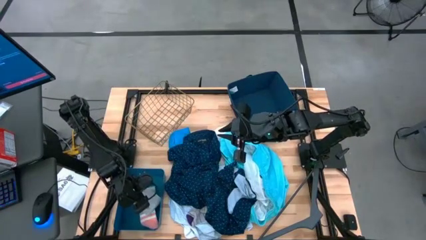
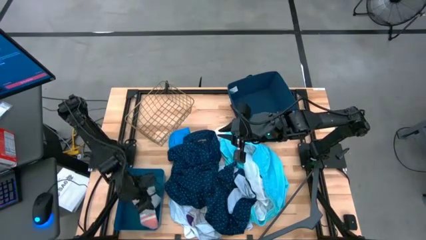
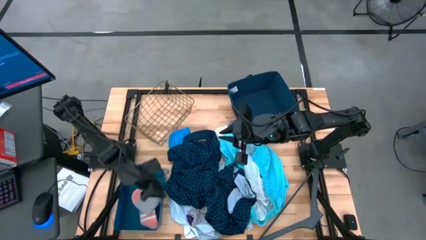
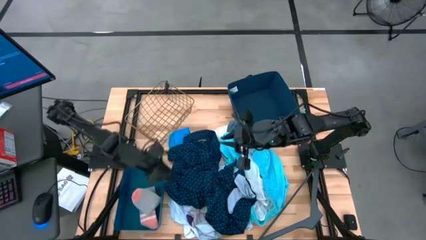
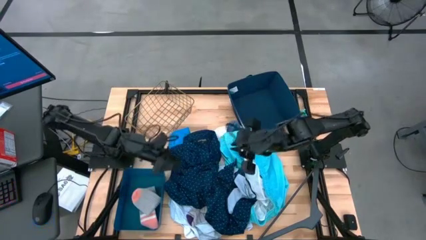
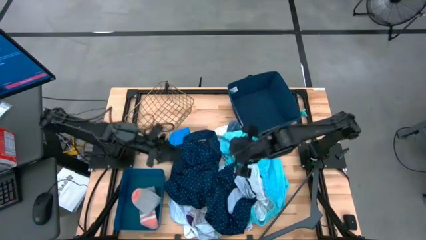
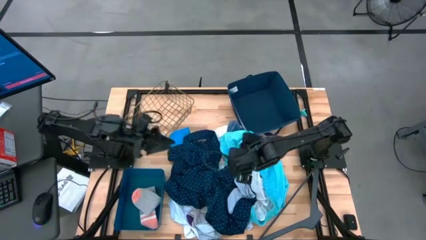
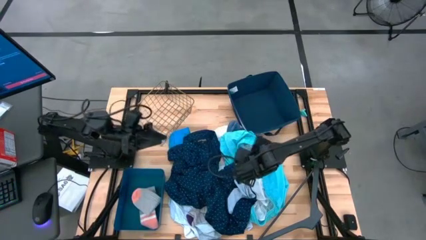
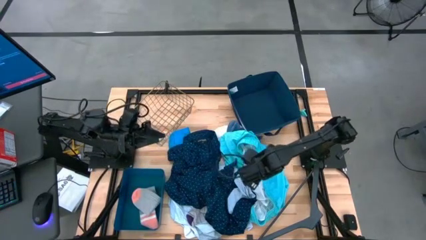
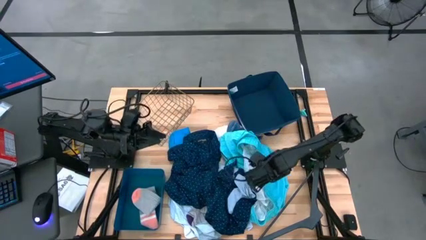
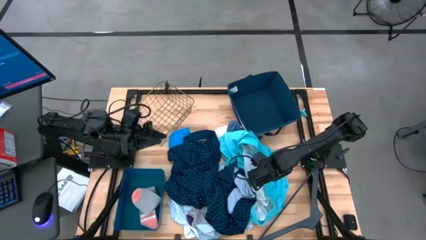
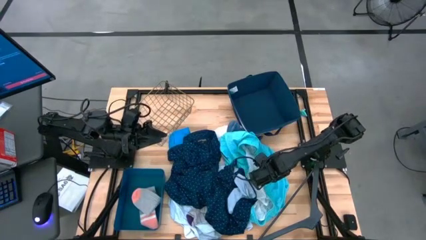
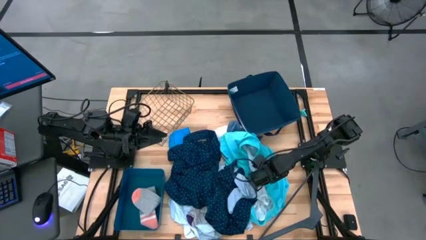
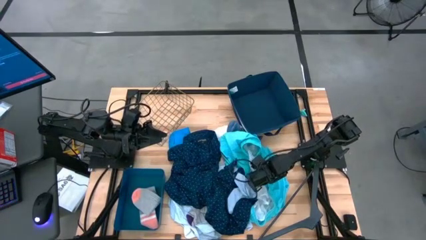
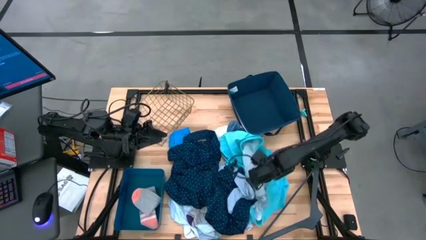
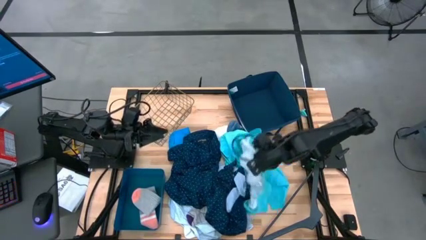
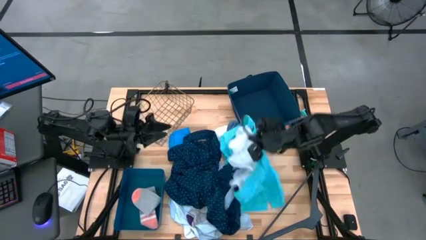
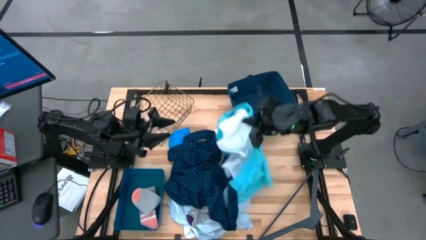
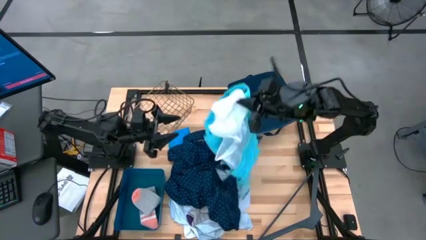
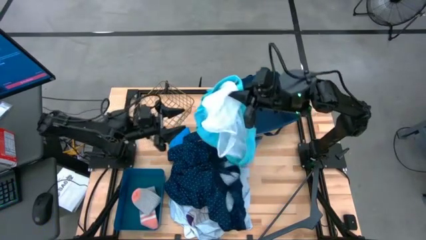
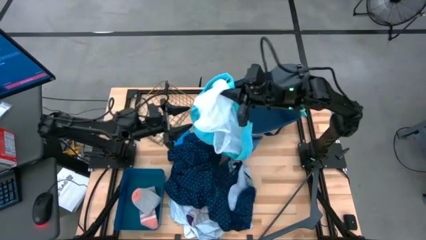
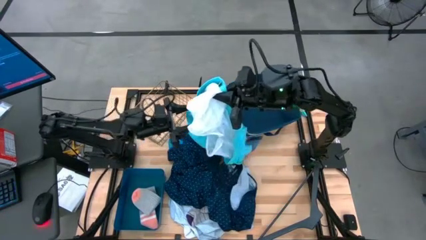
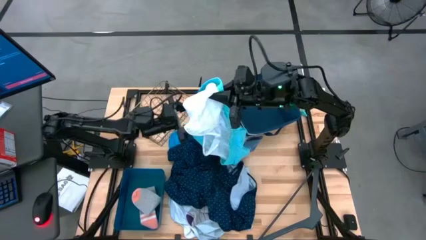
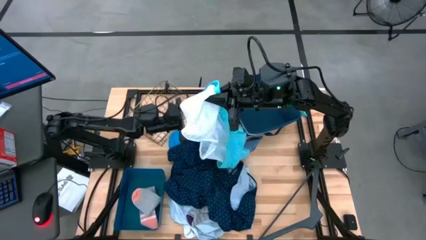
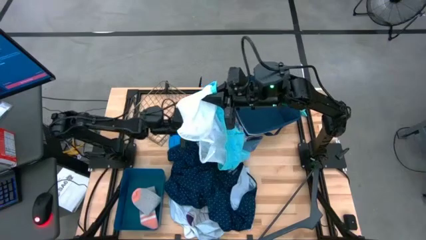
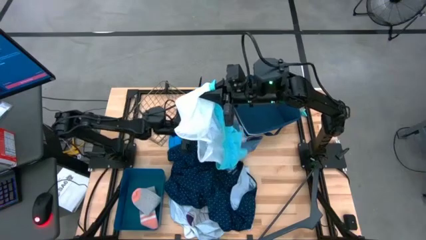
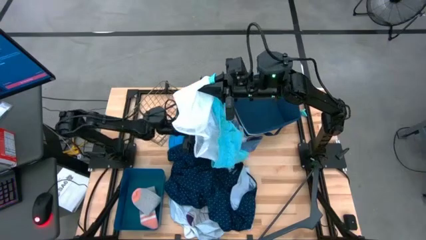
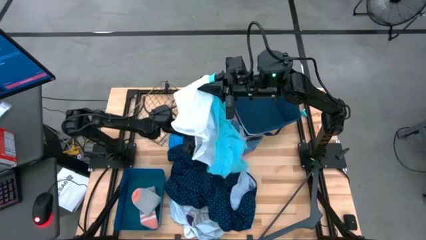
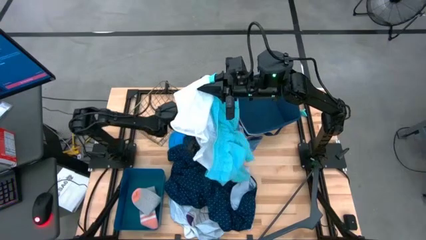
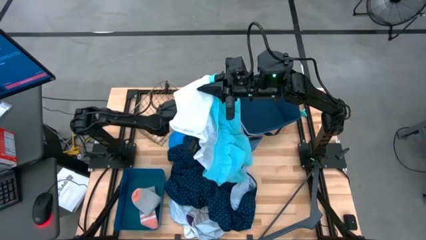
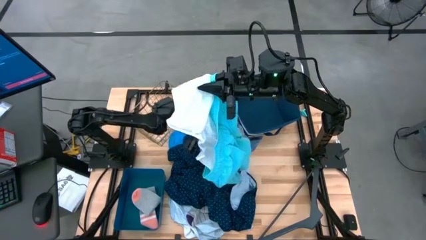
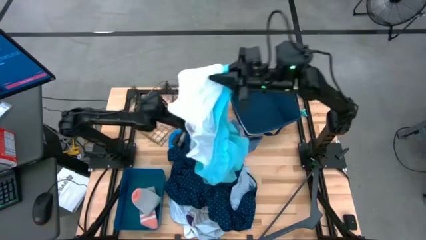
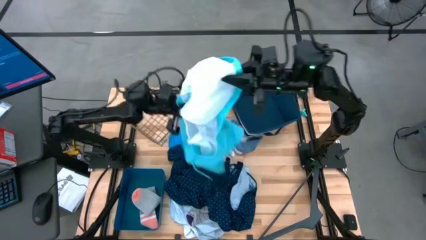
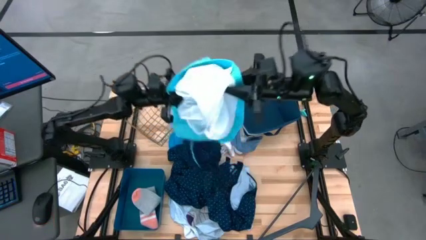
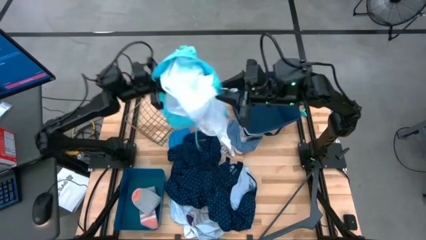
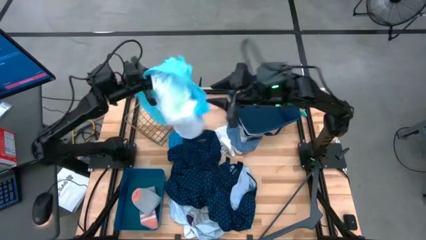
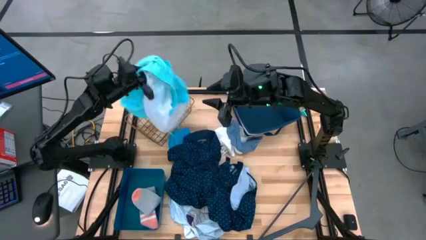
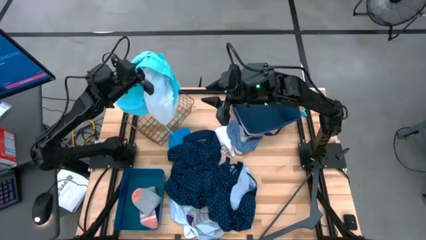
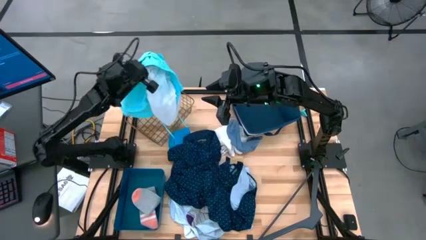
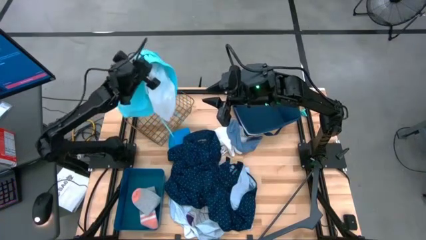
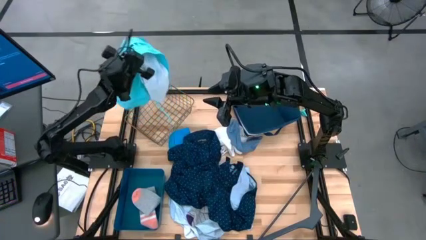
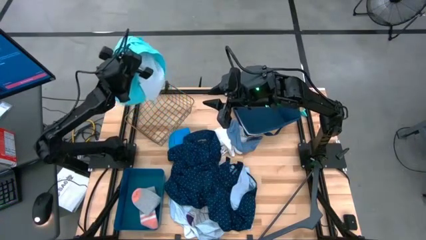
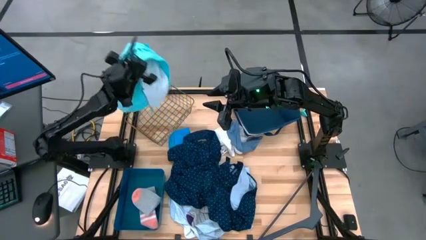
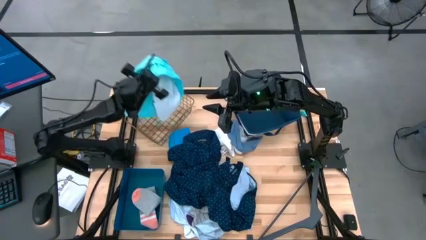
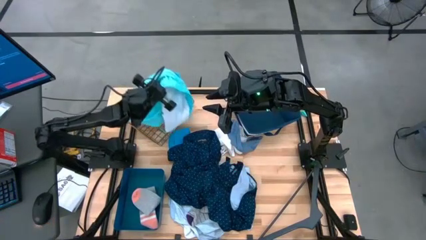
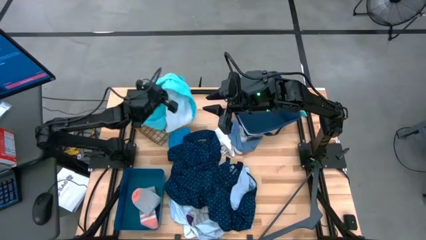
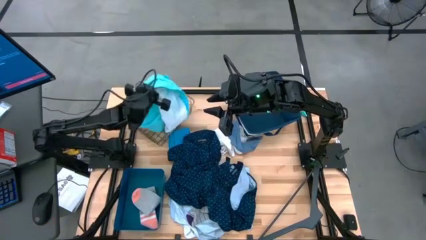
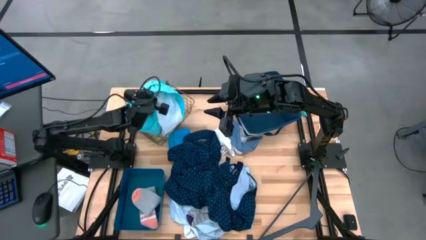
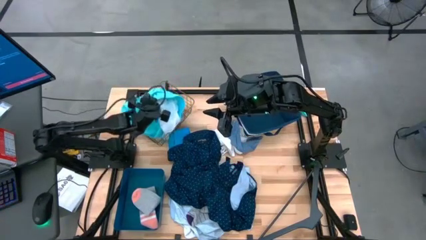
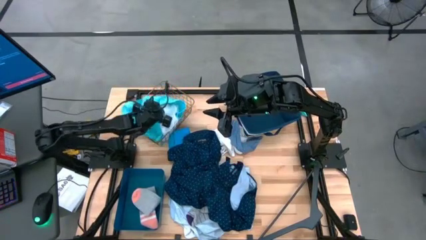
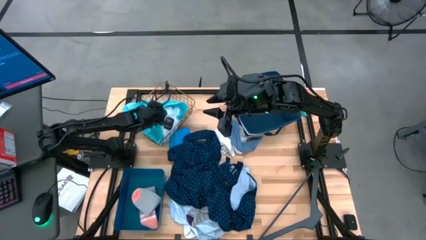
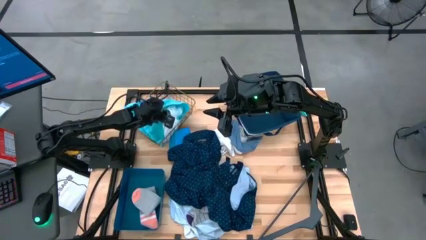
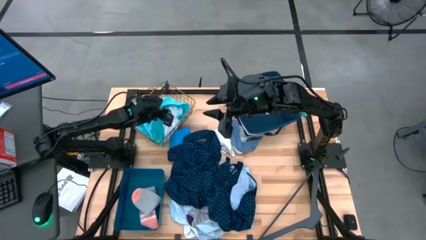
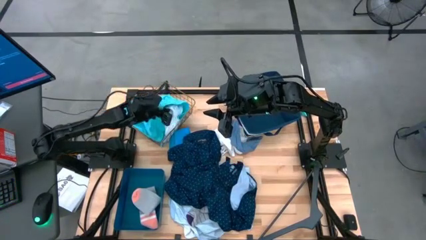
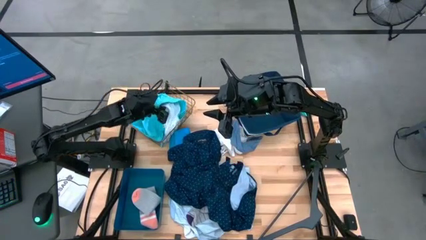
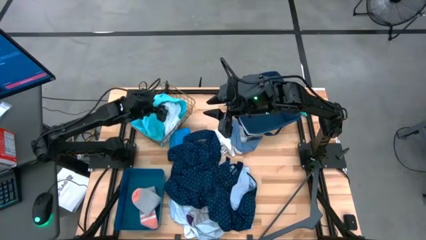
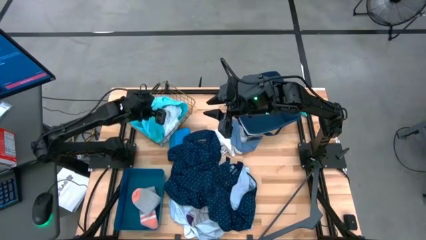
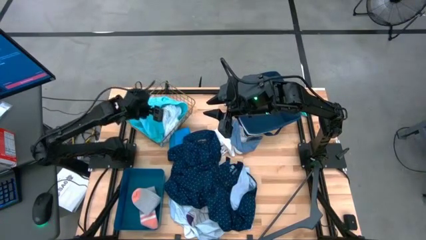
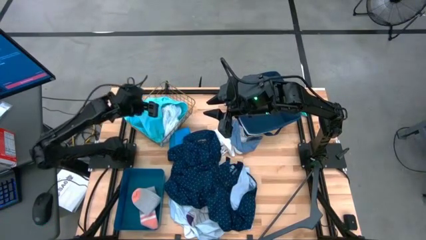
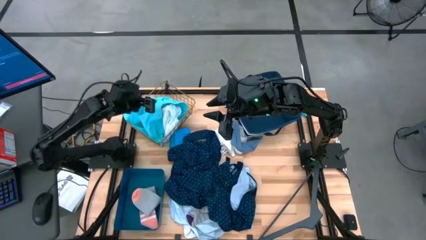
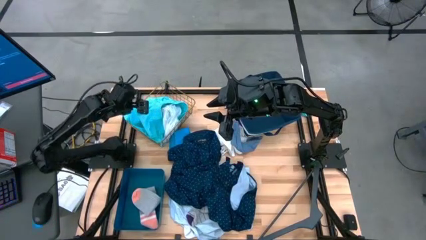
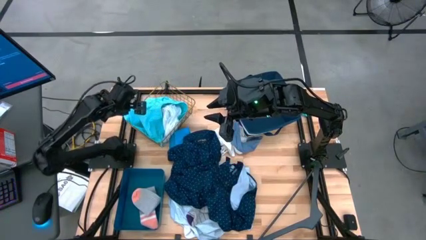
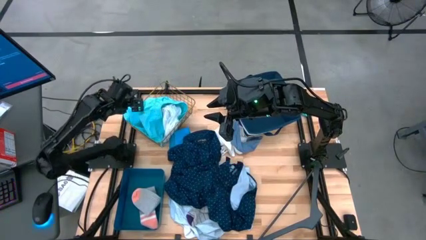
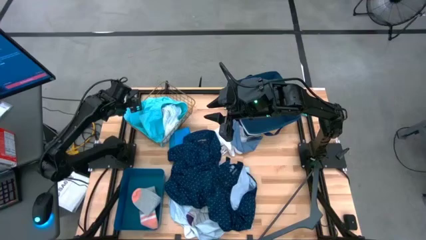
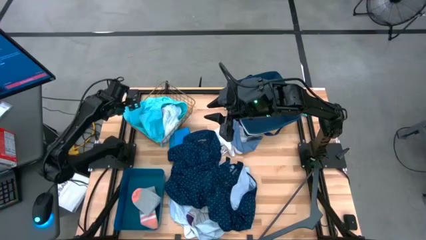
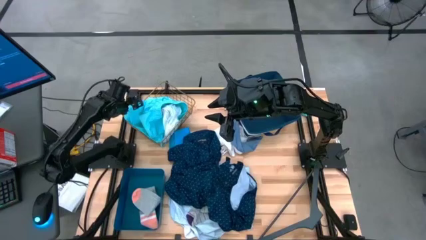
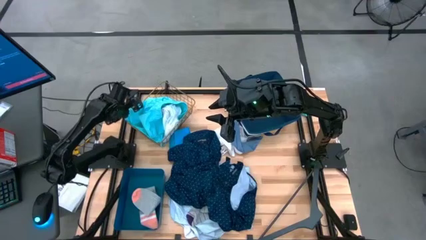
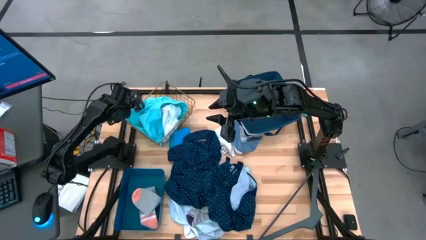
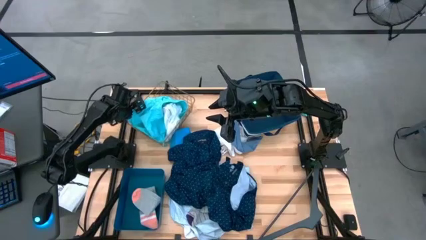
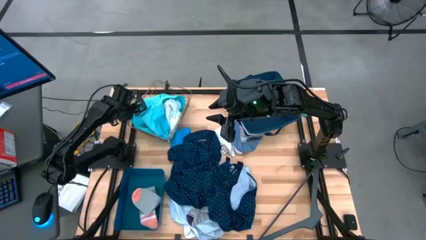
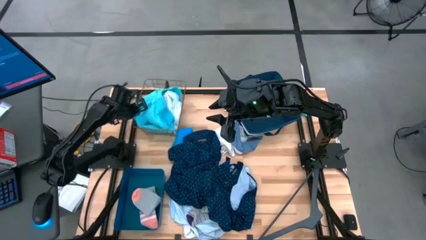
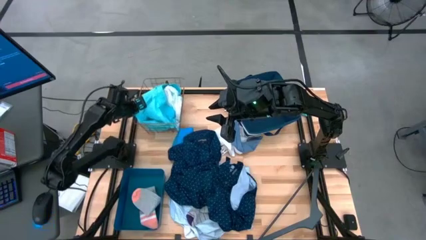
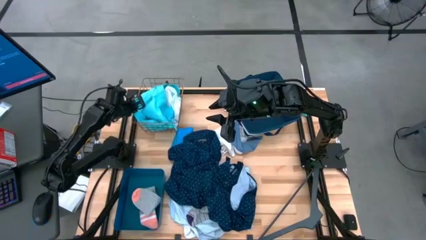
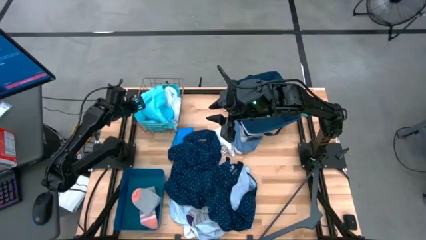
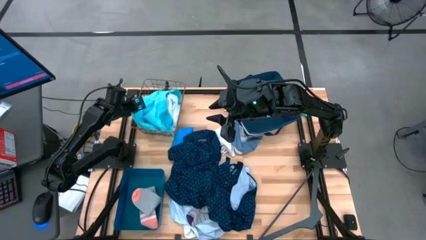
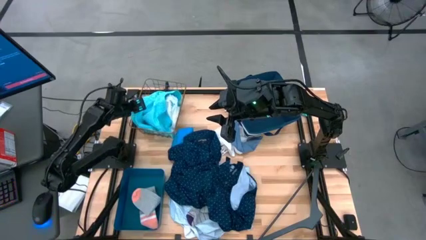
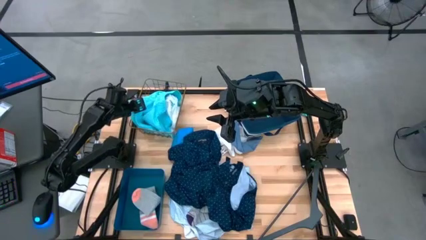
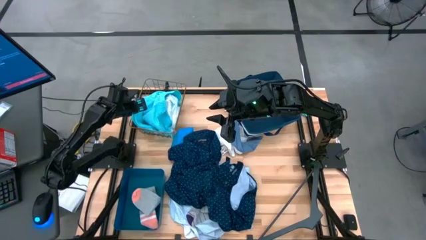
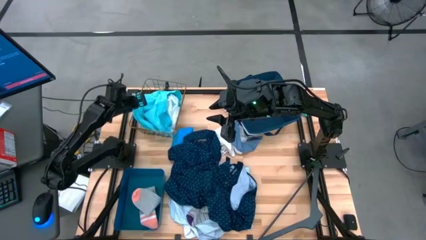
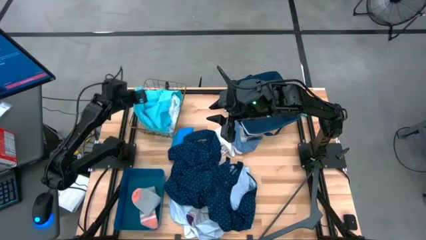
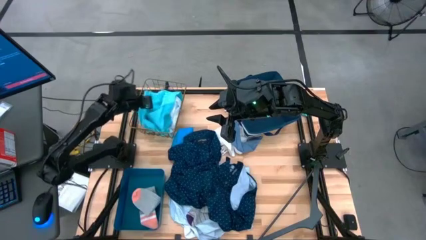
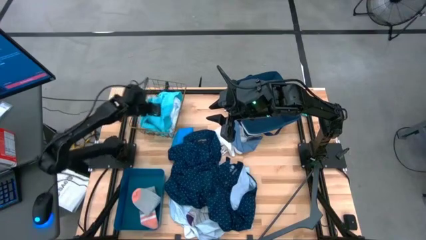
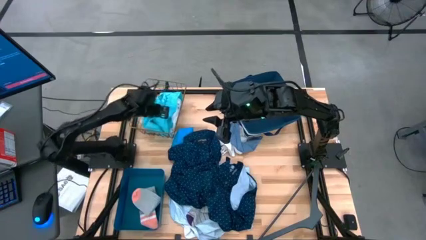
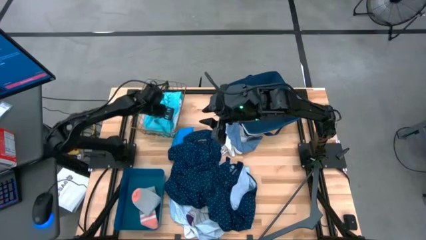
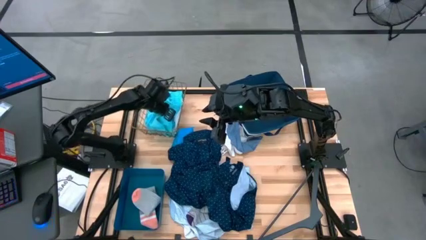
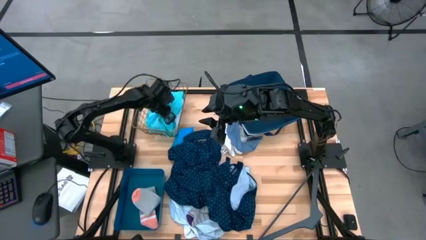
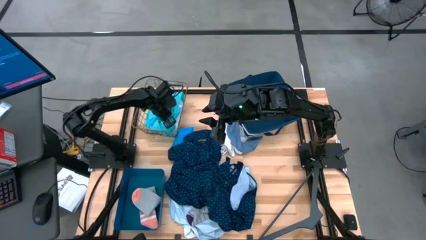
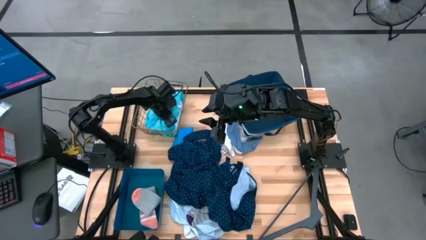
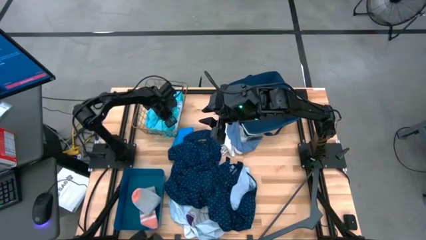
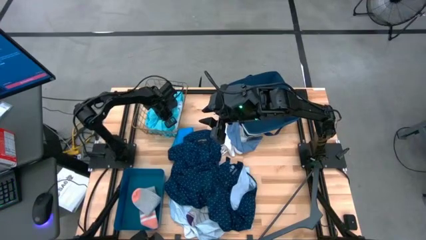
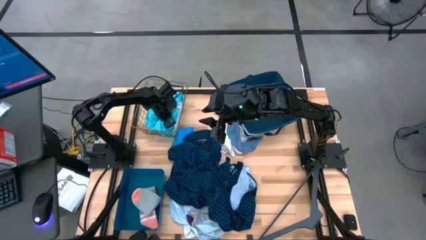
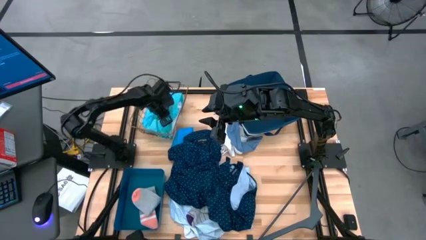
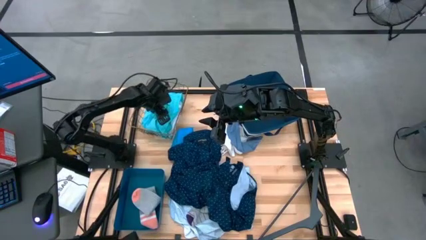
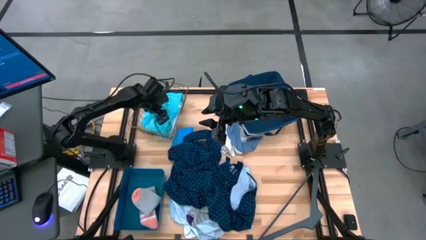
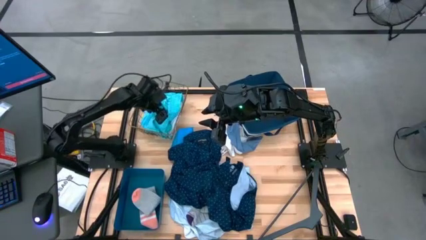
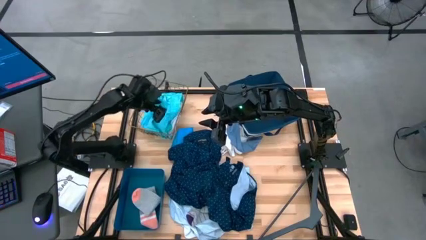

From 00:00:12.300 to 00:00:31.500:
Task: Pick & Place Cloths
Put the blue shorts into the brown wire basket
